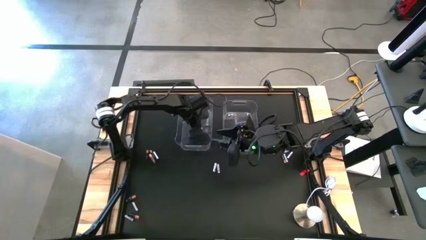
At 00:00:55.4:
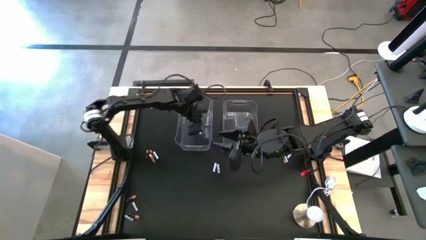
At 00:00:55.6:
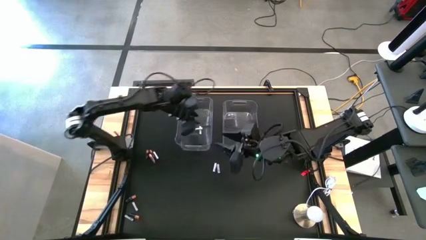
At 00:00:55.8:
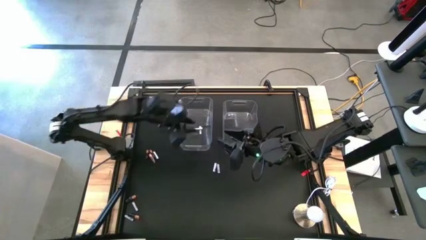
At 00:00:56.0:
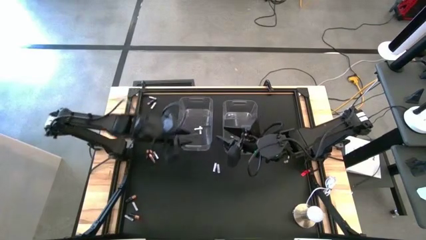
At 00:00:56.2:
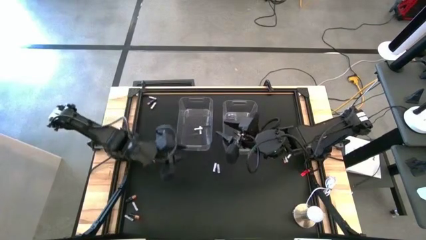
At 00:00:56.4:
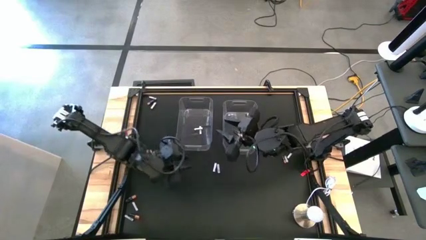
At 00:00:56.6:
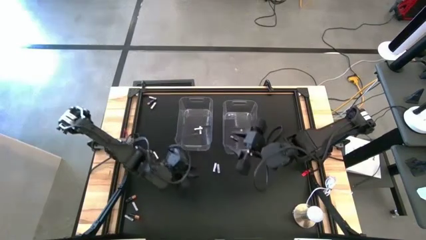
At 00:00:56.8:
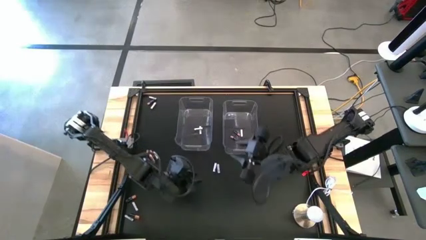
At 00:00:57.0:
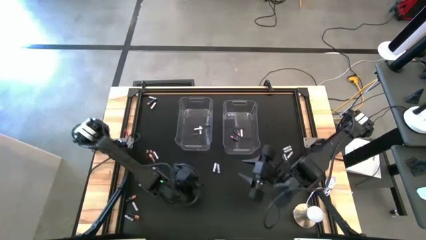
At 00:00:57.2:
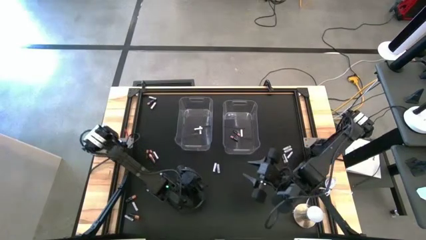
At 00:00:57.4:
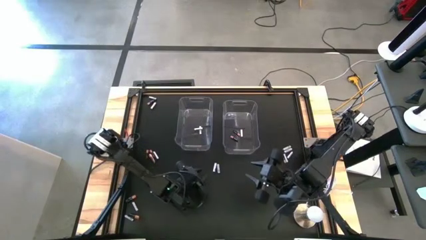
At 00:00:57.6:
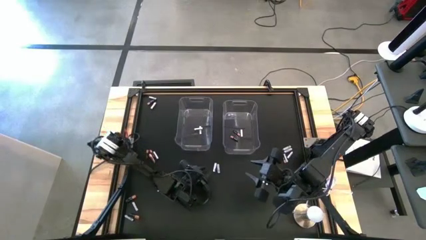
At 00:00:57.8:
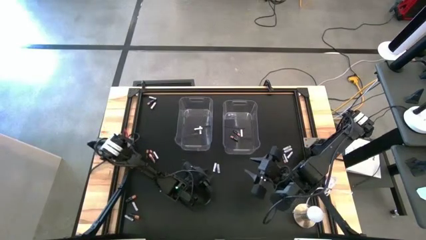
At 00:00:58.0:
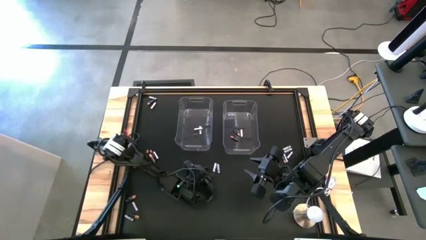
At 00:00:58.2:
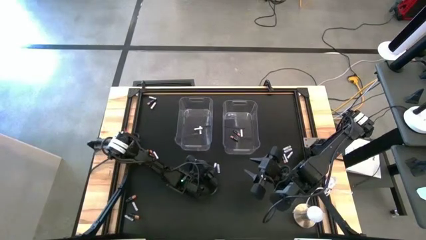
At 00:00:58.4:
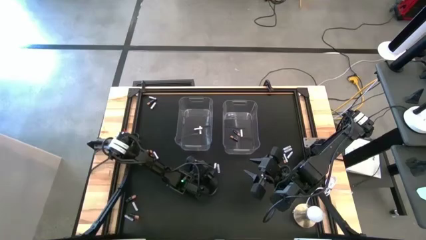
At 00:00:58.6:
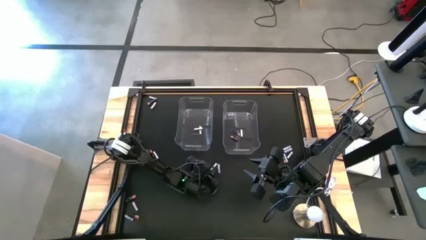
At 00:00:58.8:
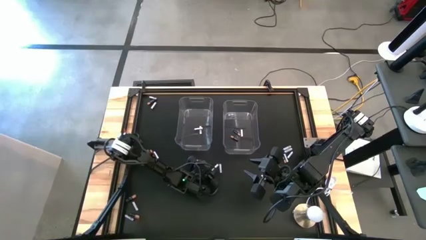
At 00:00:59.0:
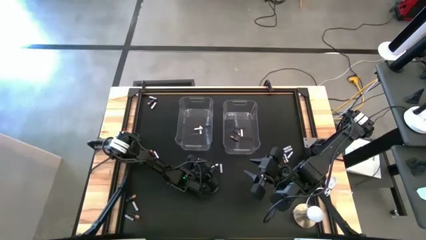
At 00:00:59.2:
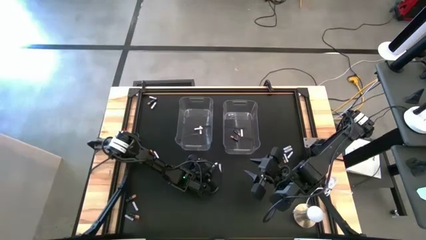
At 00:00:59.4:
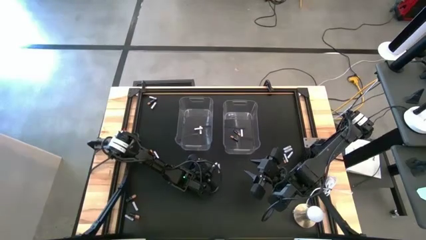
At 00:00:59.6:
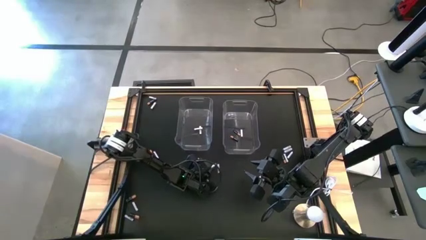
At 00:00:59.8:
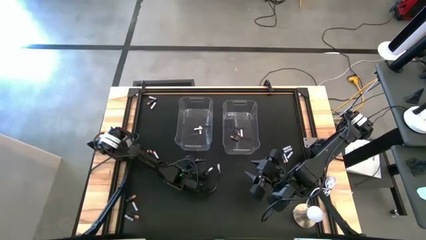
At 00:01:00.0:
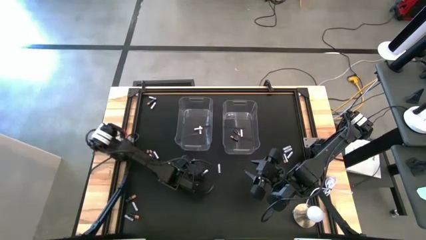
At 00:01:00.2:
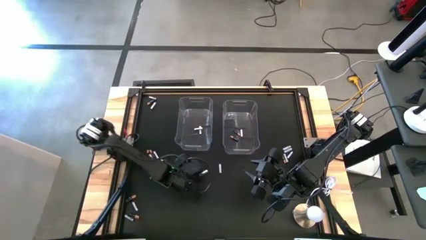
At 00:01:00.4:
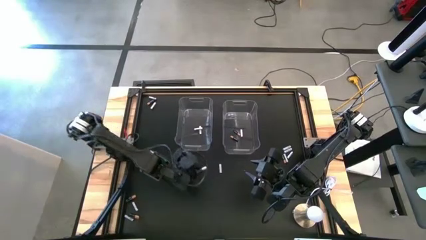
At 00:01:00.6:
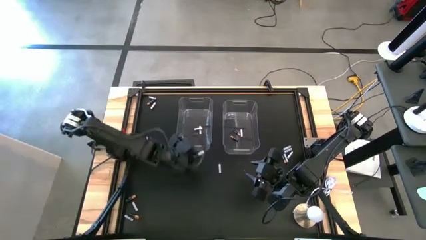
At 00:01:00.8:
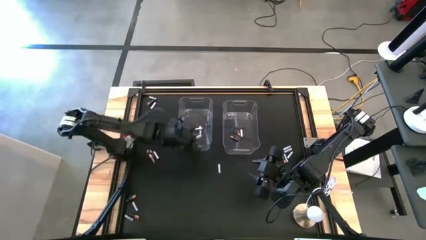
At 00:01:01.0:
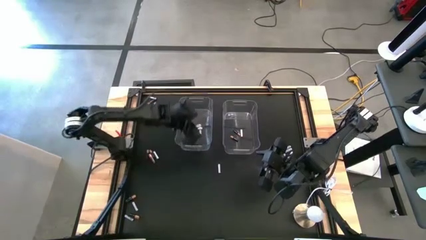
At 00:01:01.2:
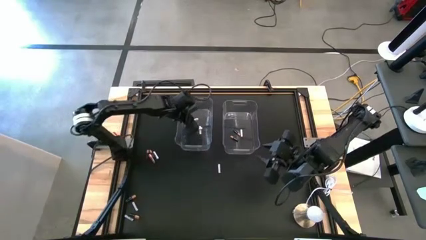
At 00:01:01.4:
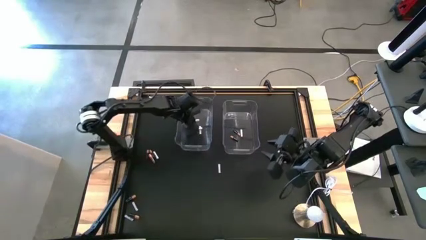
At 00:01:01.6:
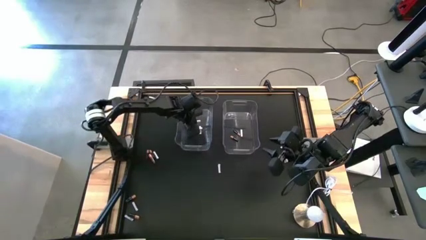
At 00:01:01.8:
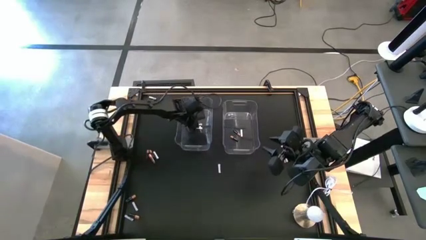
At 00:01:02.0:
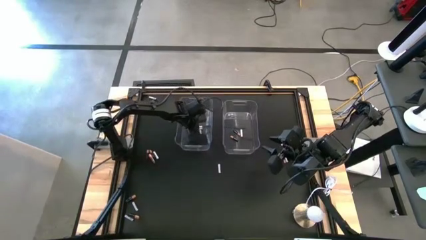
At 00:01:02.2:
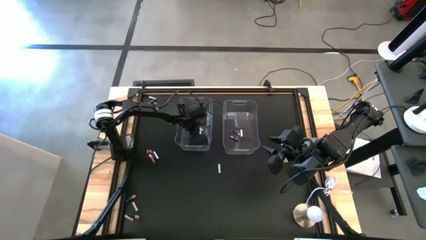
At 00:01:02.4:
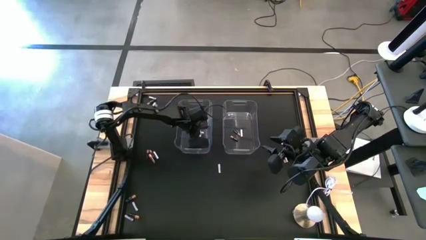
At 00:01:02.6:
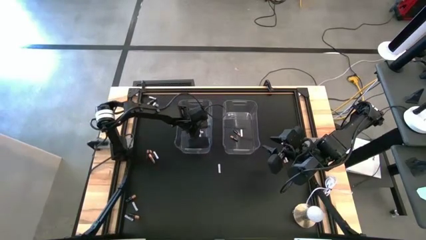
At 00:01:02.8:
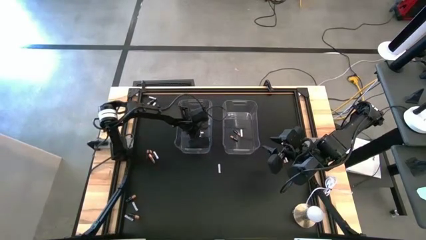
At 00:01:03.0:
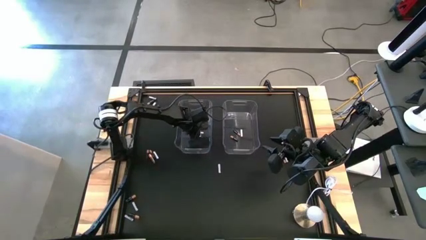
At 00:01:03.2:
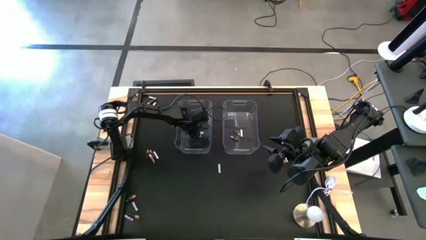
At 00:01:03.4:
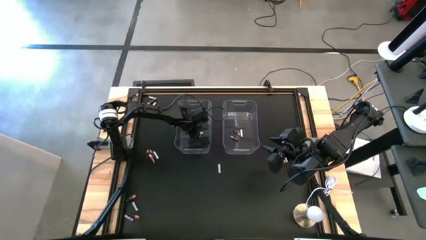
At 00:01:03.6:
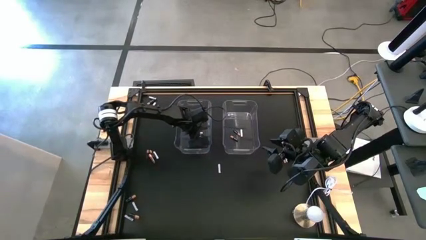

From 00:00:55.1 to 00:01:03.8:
Task: Sort batteries
Put the white battery into the left transparent bin

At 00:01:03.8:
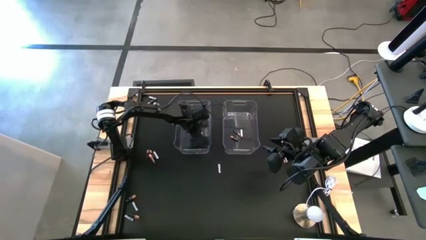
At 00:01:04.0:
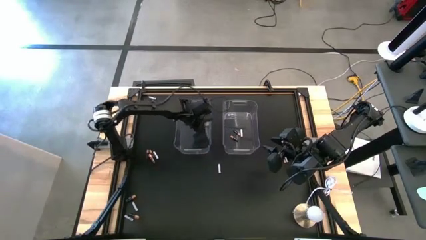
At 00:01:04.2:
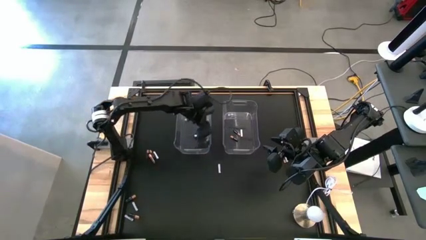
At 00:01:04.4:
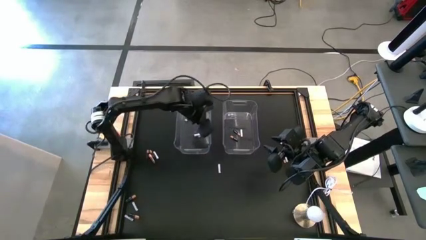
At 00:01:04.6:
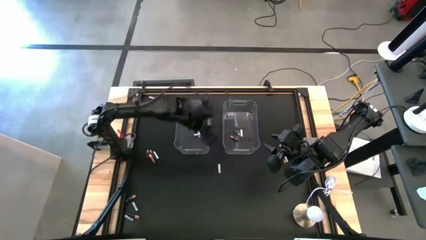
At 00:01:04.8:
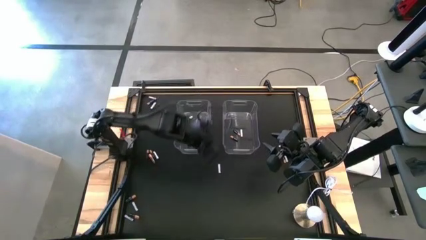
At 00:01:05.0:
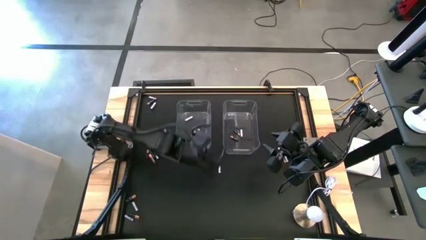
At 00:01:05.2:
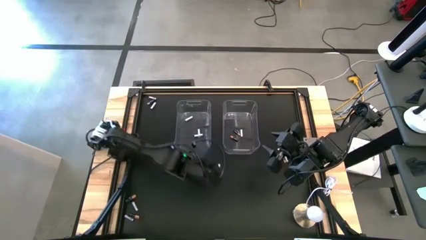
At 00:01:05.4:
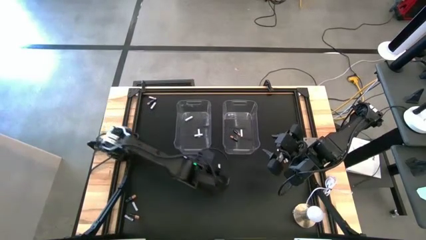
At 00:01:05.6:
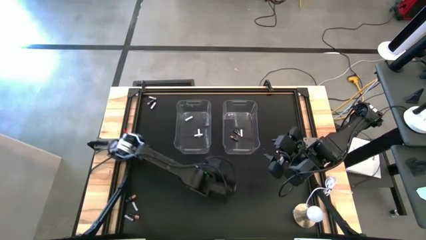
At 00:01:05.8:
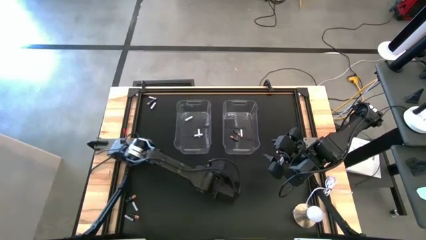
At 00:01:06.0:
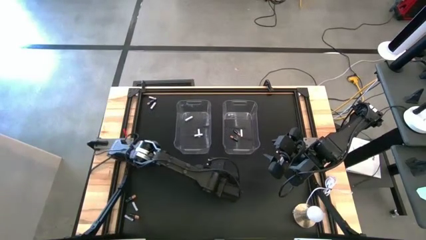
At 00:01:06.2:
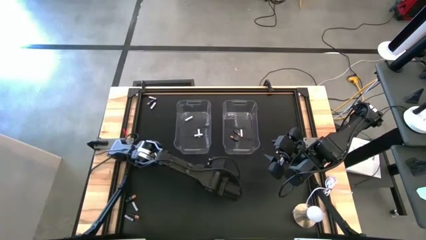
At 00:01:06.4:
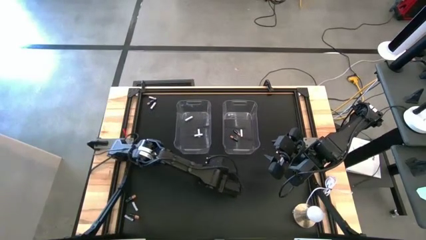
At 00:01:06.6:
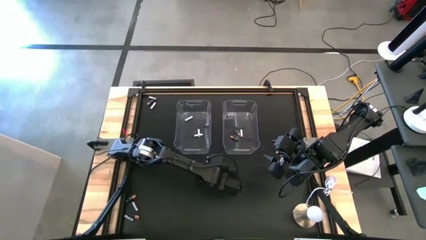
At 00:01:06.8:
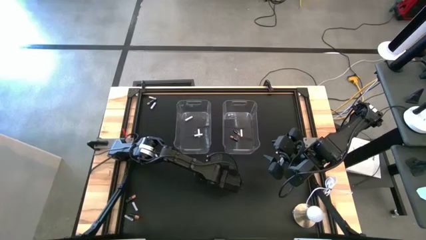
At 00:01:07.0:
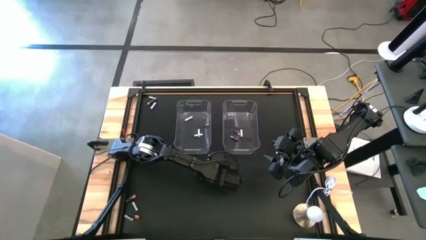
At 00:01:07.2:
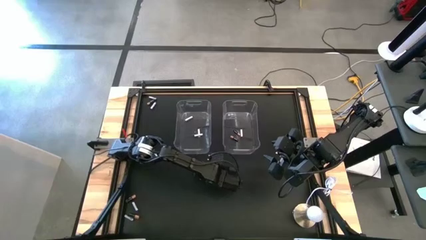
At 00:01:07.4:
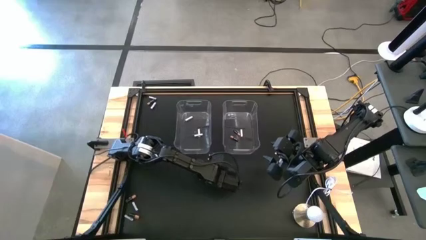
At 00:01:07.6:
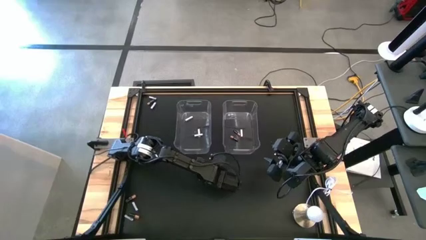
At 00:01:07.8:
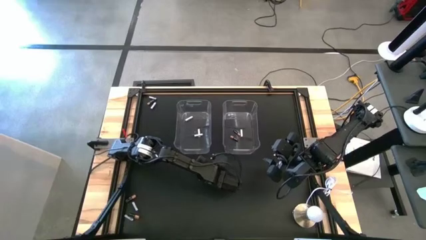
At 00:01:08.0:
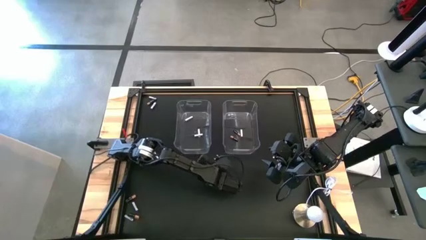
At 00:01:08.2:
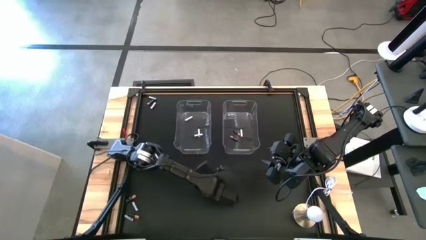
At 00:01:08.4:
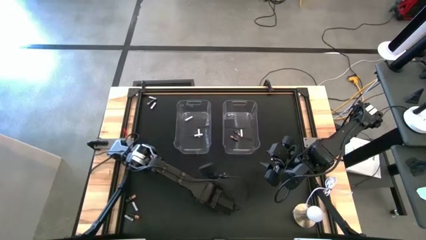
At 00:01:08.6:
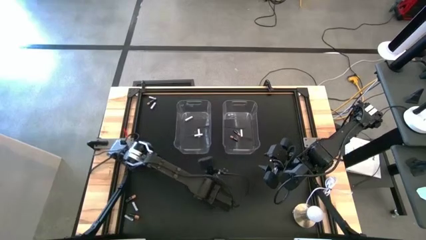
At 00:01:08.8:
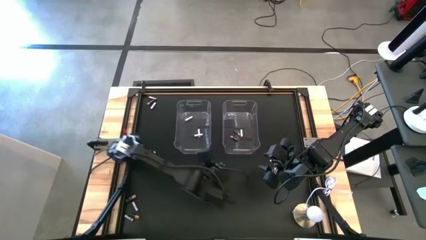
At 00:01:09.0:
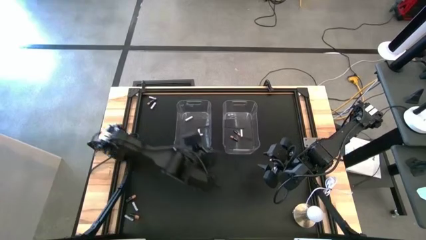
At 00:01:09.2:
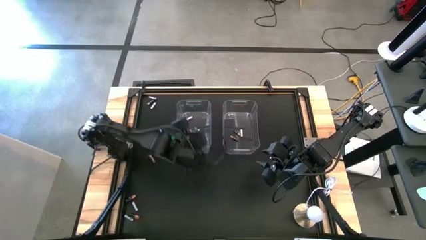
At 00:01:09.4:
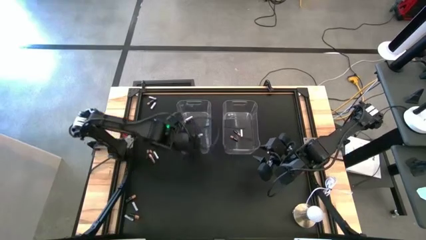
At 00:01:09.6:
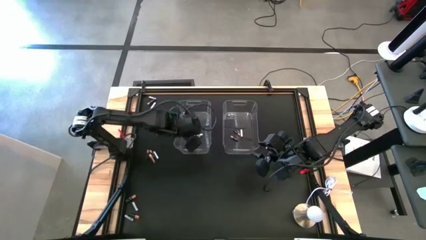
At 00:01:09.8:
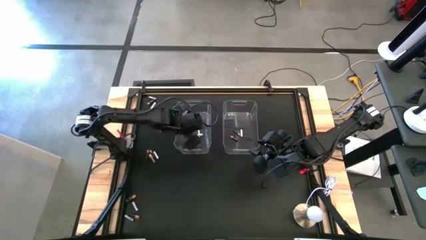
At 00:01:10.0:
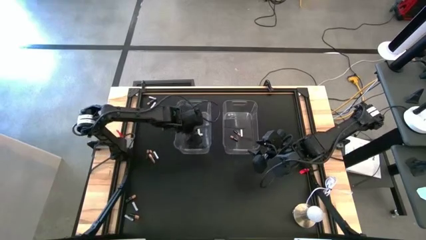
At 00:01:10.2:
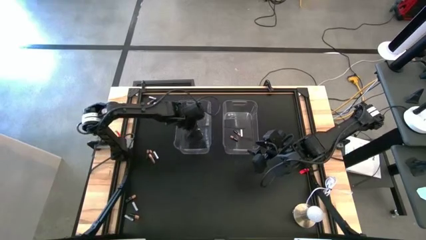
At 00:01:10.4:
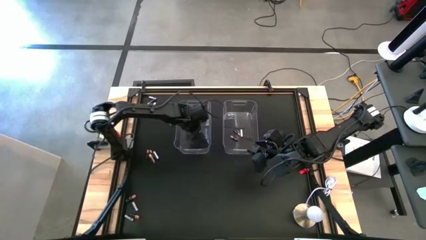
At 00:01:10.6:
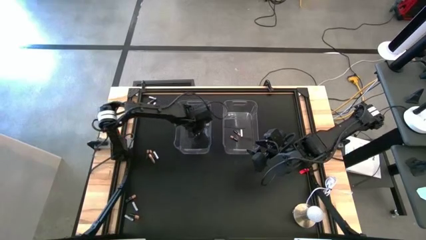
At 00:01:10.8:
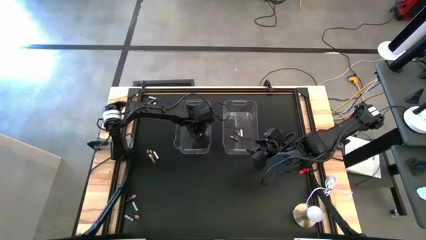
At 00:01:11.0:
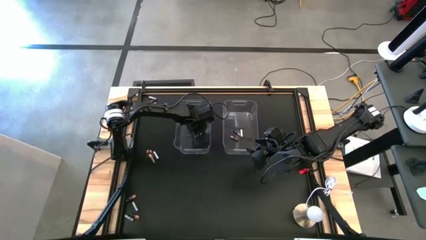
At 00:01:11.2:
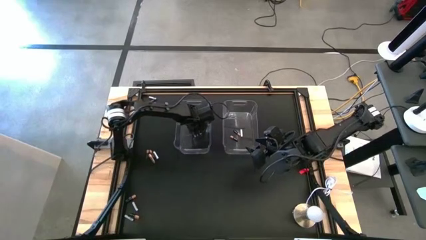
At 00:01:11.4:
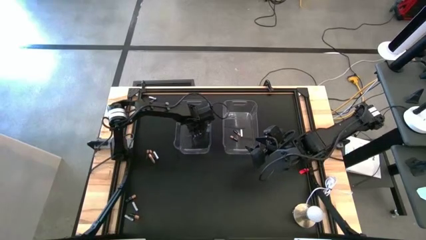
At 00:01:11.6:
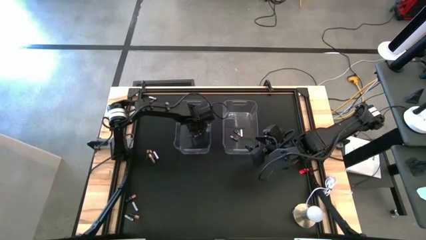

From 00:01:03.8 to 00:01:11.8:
Put the white battery into the left transparent bin
